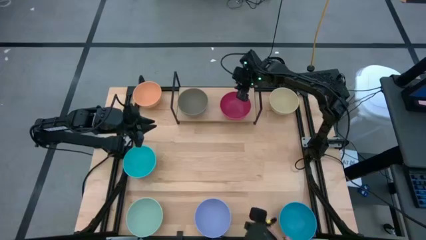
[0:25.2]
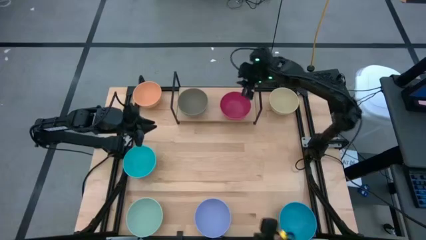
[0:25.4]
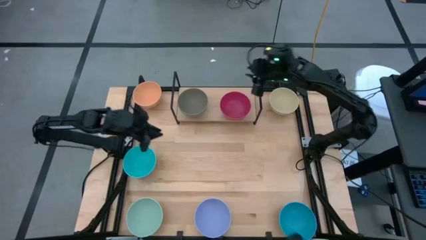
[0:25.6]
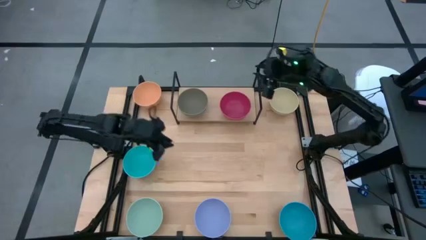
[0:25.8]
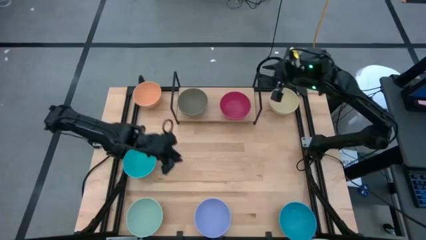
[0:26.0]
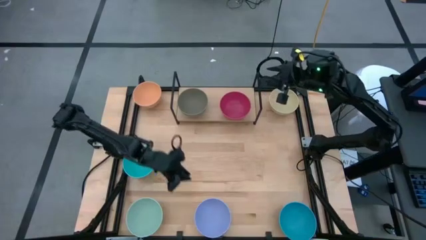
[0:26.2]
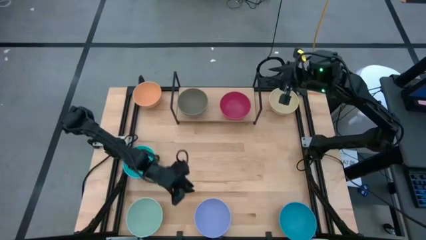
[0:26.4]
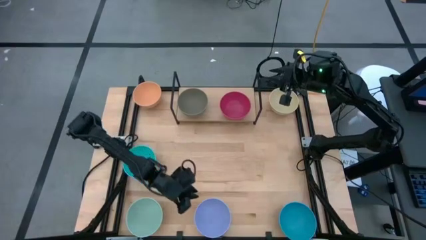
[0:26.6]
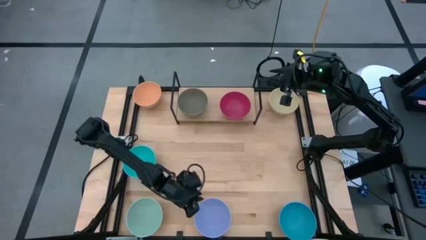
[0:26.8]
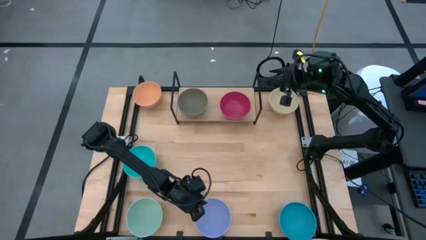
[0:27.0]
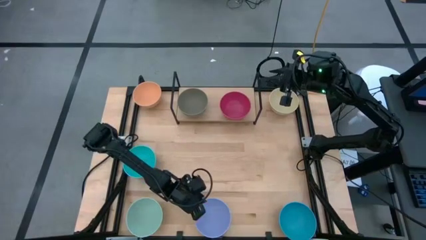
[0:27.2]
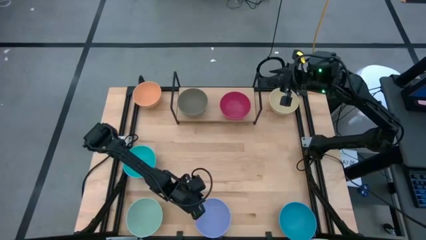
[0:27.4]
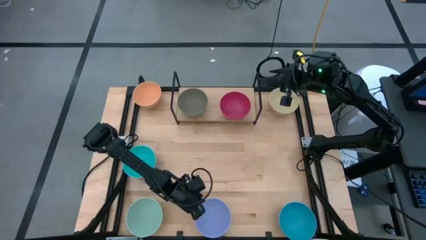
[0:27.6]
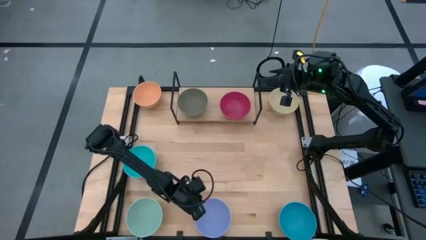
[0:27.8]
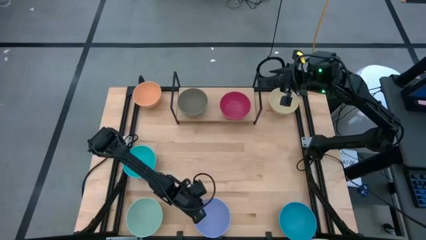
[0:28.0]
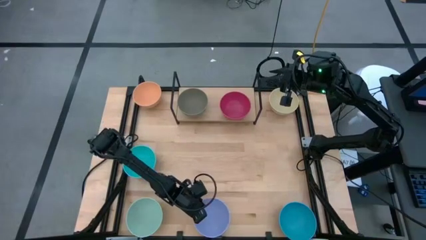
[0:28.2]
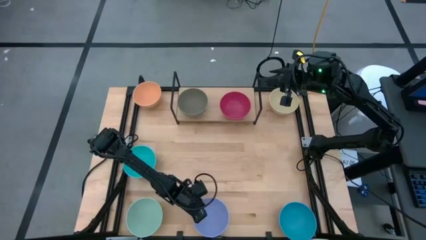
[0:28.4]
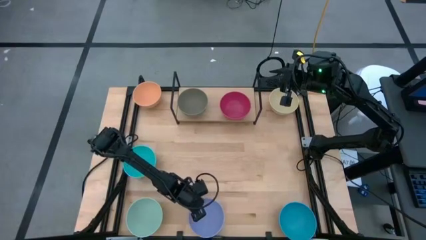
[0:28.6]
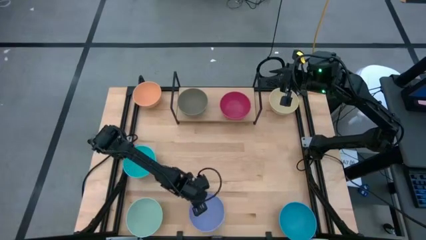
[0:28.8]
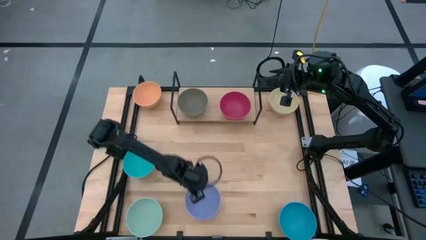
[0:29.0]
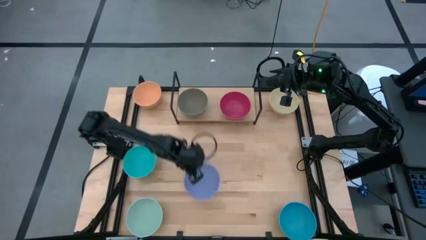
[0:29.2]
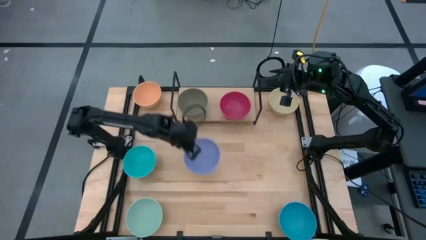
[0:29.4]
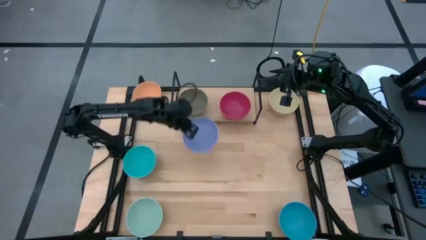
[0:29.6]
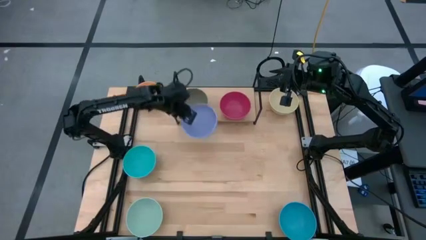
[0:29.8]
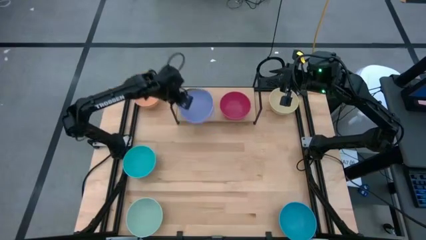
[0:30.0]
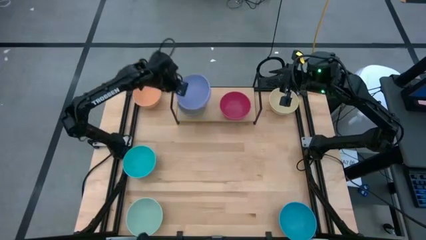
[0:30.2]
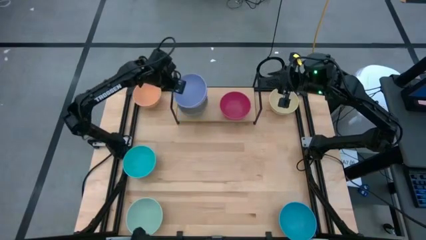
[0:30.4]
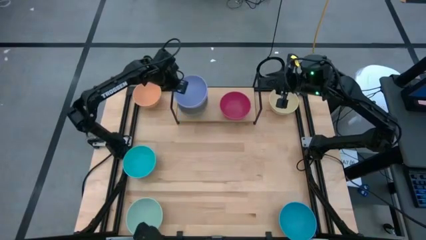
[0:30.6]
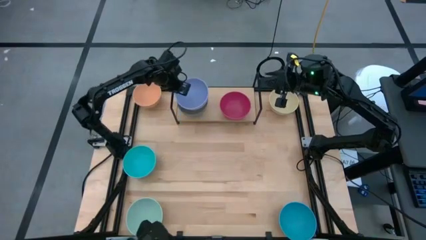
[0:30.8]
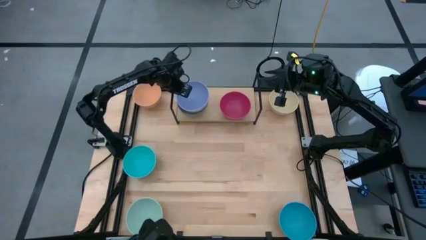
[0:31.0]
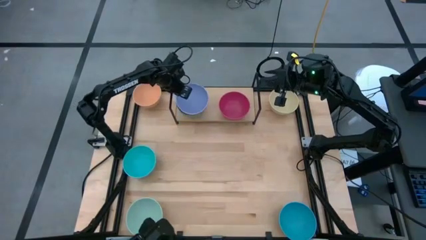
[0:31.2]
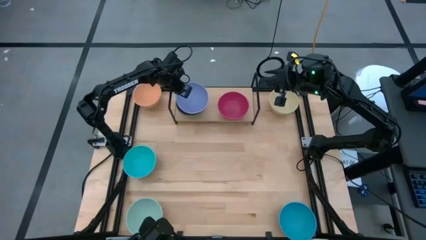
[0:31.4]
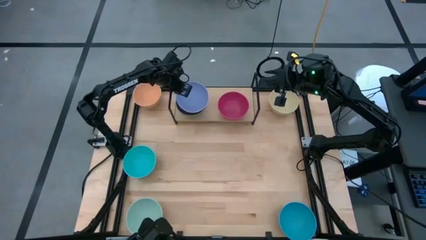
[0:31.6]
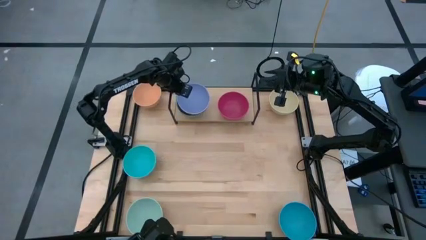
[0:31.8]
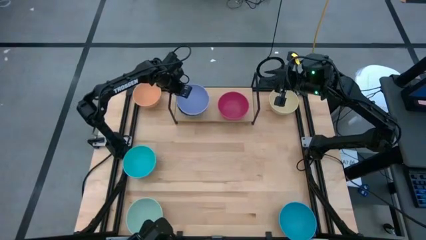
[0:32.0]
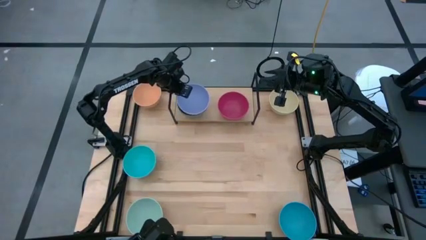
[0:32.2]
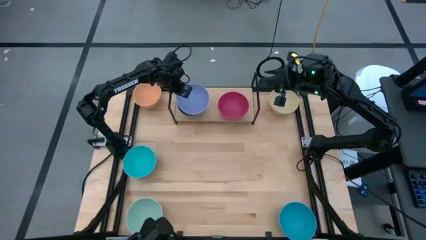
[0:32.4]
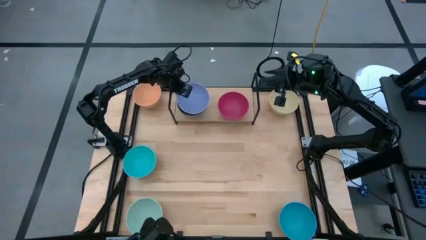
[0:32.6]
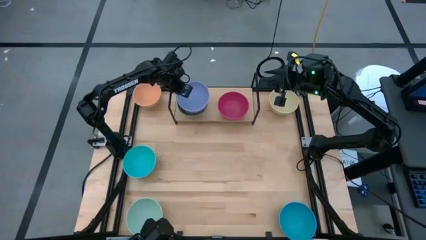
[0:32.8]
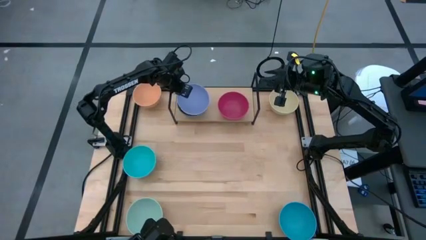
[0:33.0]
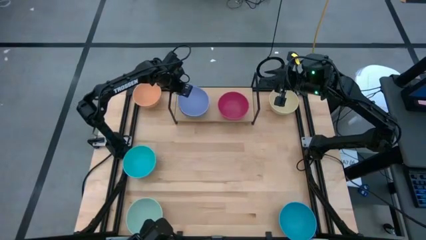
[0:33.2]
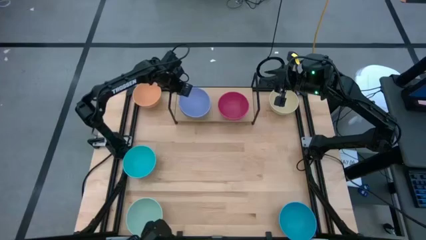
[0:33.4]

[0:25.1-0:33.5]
Task: Place and stack bowls onto a shelf
Stack the purple bowl on top of the gray bowl on the shelf

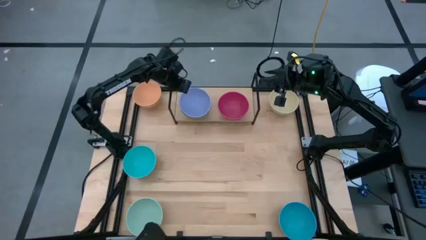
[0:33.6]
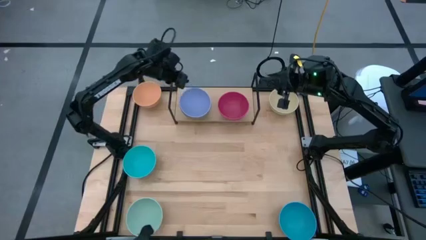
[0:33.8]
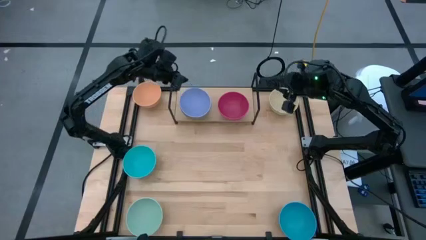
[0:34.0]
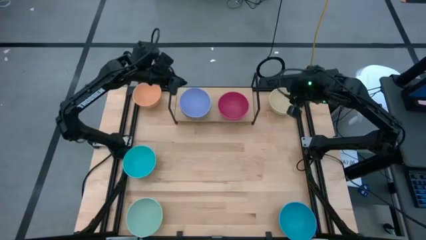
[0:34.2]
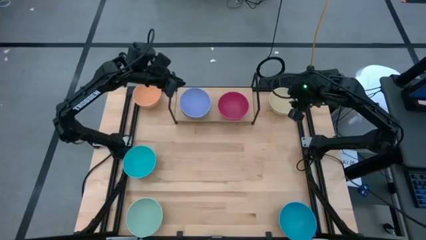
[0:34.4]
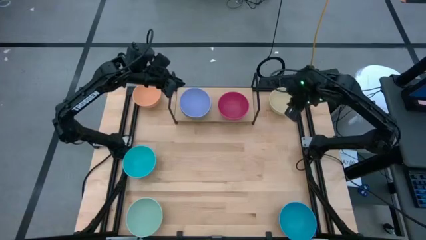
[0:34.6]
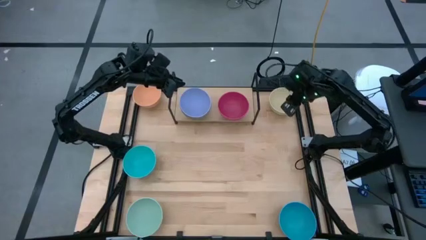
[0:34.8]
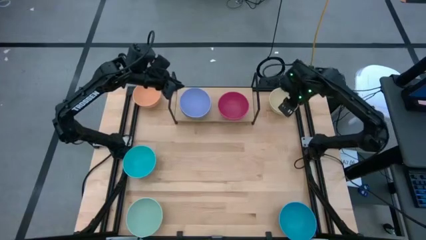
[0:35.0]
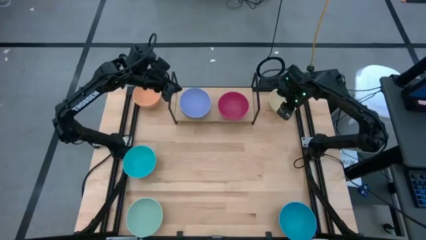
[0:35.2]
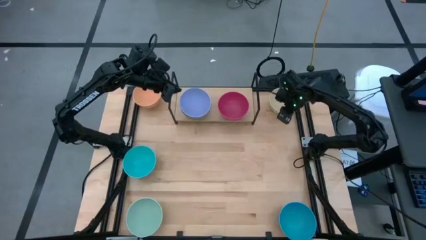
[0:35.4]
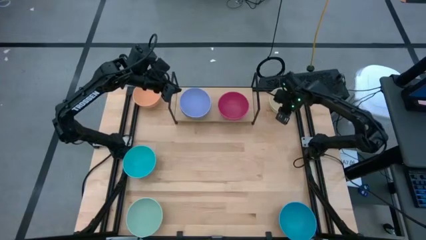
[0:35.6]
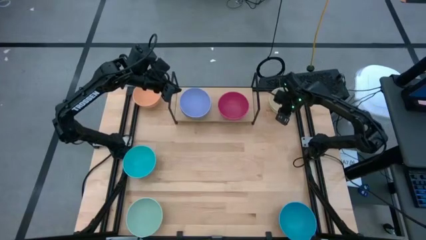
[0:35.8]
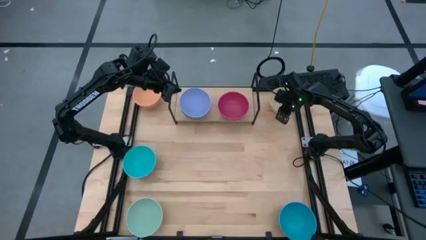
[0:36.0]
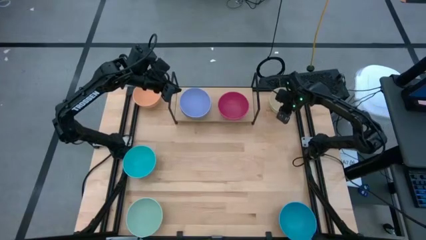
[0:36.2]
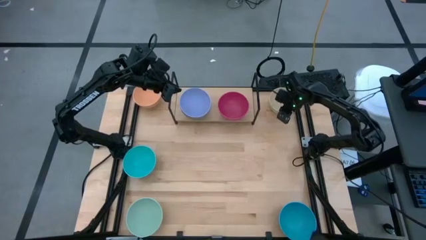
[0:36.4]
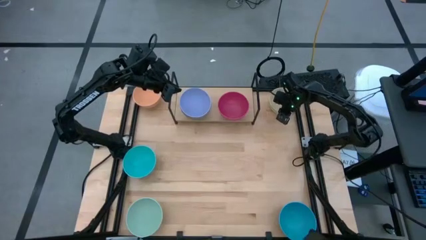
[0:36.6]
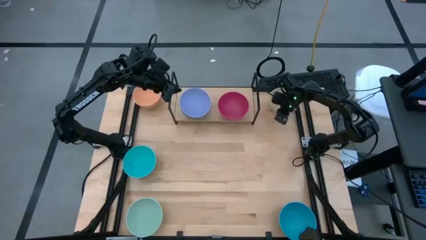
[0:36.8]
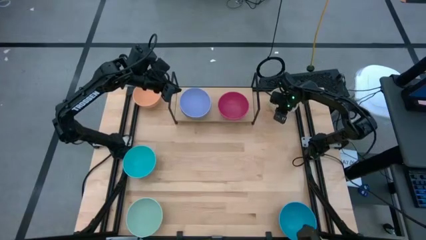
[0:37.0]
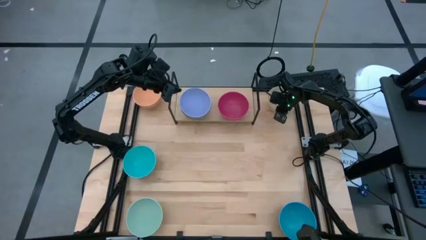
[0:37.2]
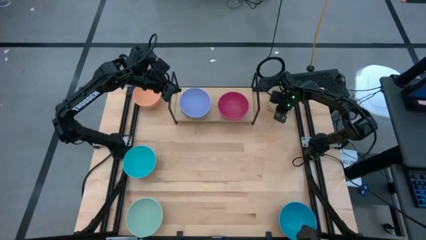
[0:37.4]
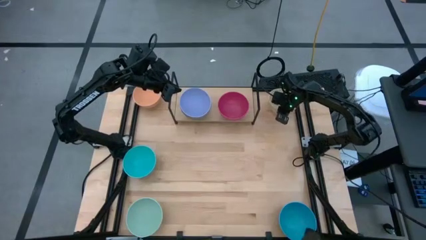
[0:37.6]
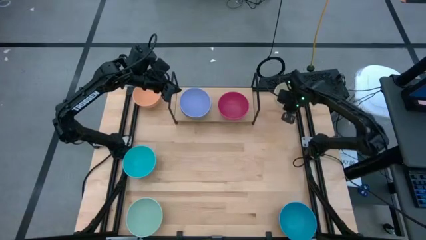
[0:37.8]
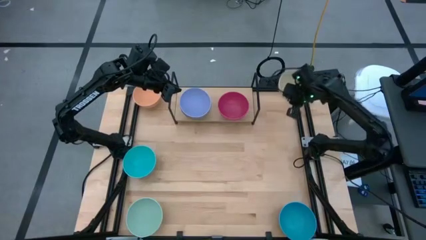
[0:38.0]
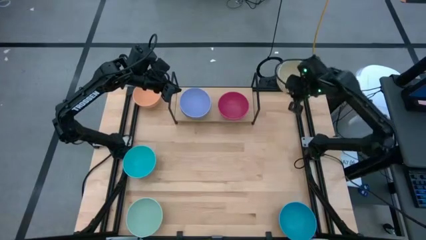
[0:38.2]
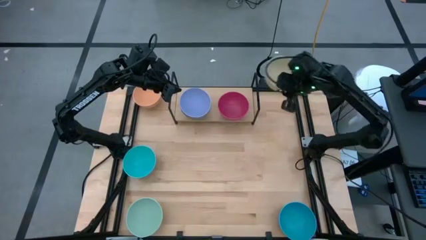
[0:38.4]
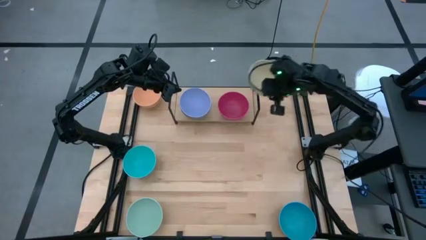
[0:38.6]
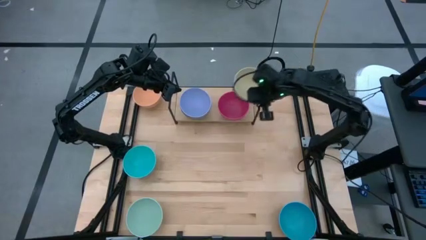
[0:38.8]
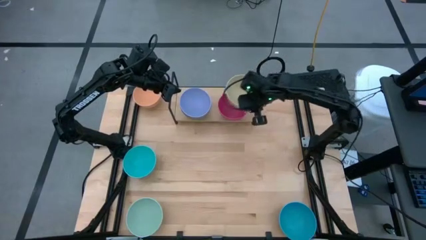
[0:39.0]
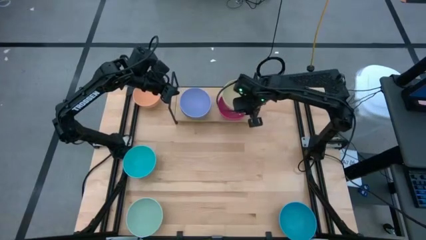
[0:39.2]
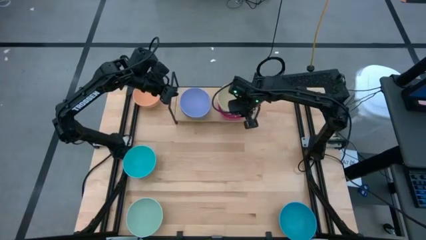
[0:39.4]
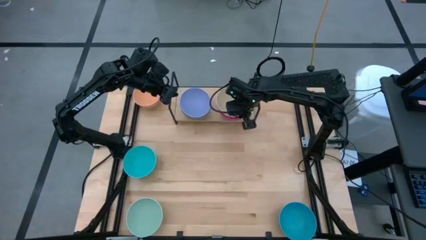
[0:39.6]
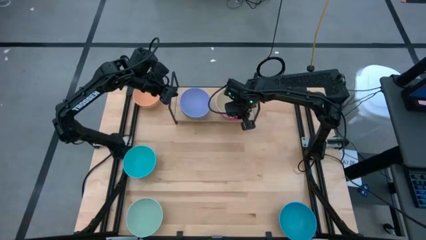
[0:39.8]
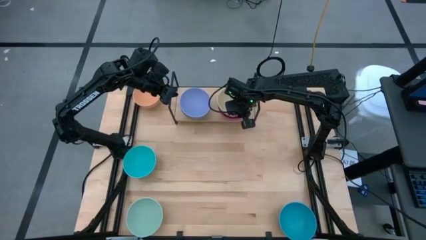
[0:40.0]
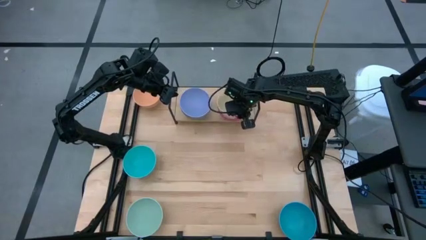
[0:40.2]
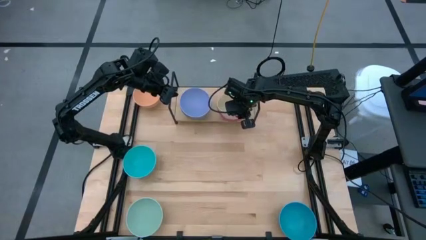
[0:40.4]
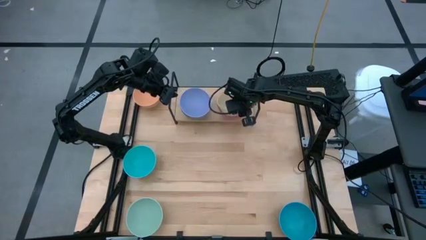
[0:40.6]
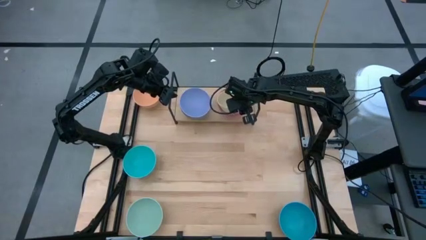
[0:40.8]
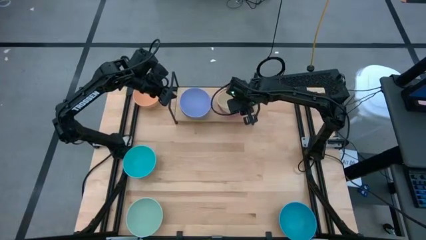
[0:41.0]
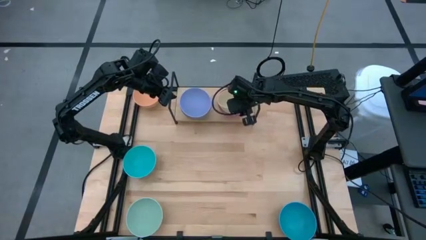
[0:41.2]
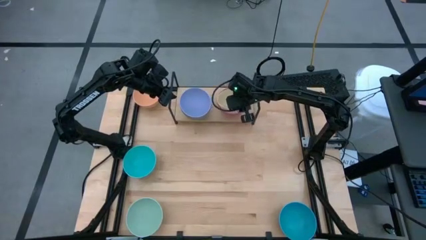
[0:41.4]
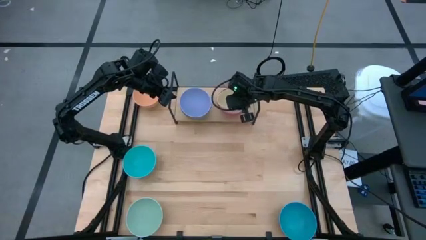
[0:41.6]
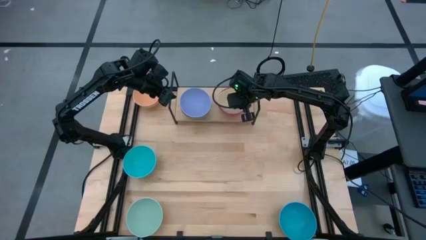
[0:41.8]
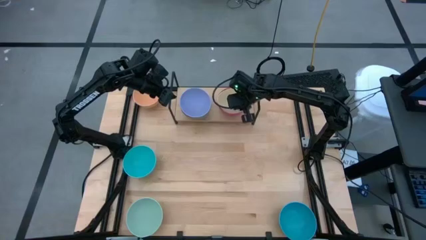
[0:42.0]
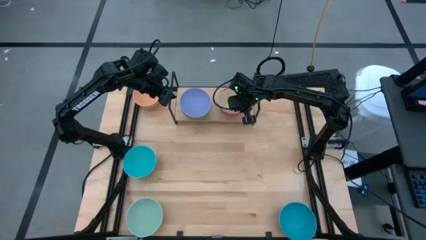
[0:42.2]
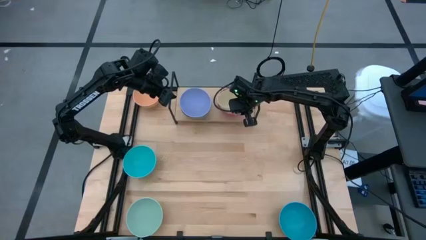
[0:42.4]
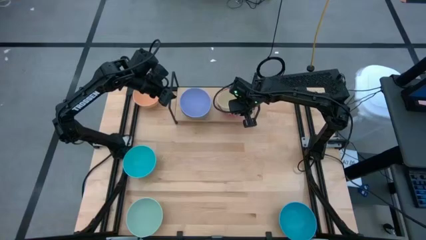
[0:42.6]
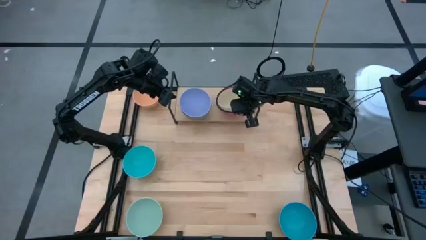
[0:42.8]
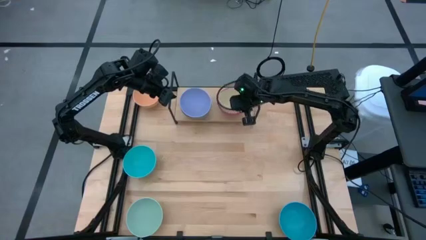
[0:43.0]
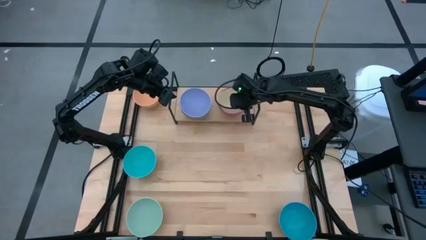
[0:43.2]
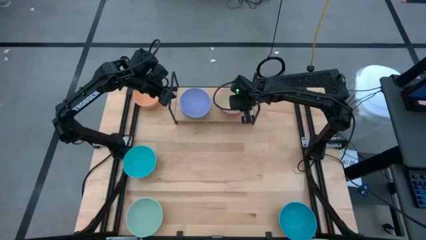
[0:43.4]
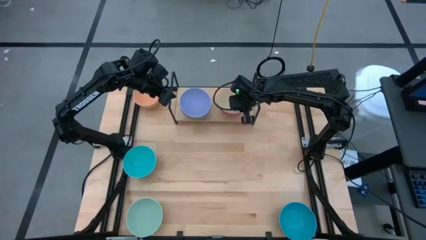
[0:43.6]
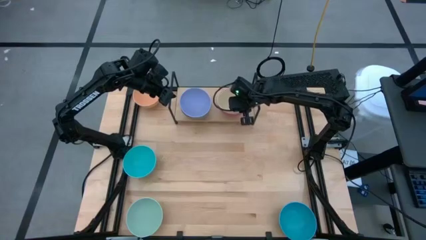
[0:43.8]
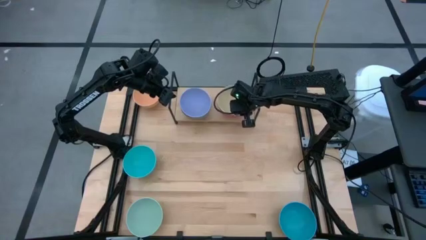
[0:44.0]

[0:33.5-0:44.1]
Stack the brown bowl on top of the pink bowl on the shelf
